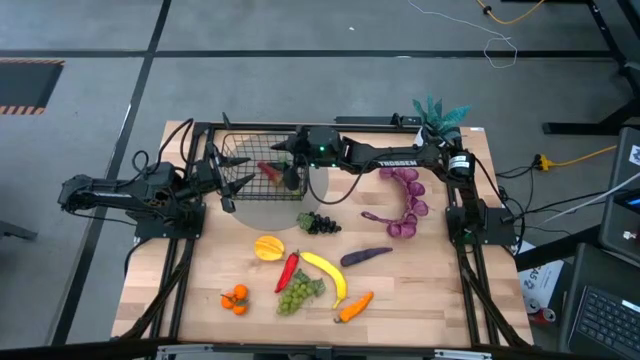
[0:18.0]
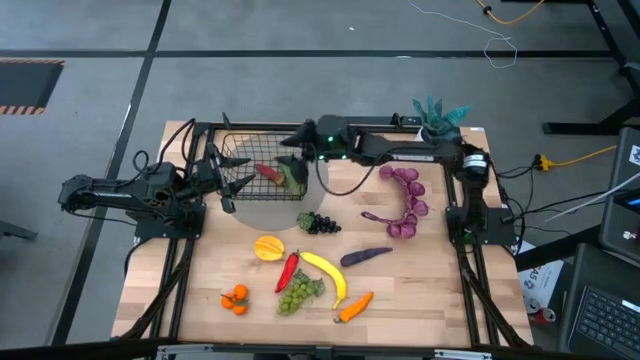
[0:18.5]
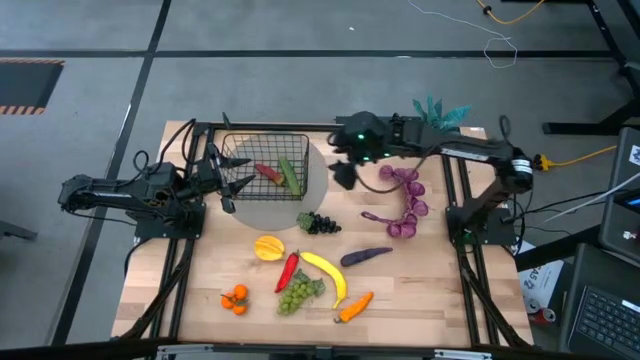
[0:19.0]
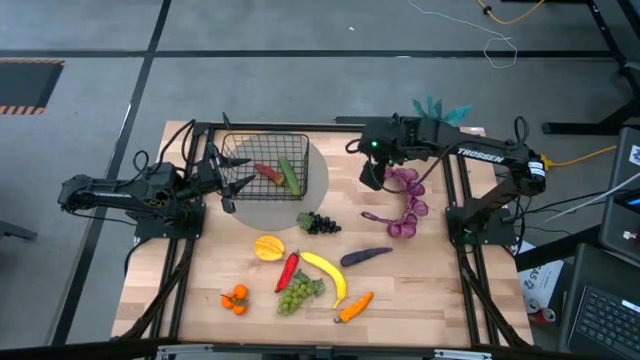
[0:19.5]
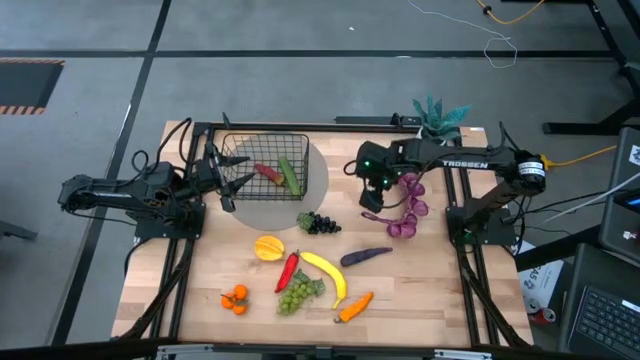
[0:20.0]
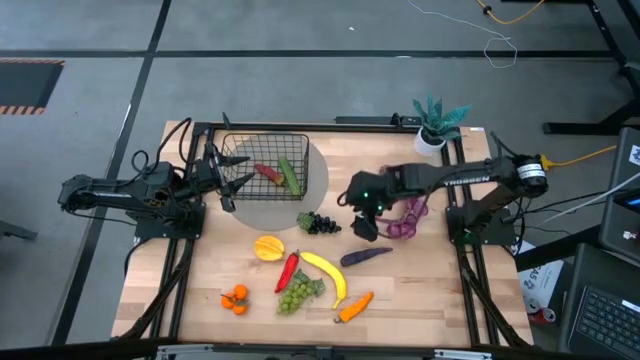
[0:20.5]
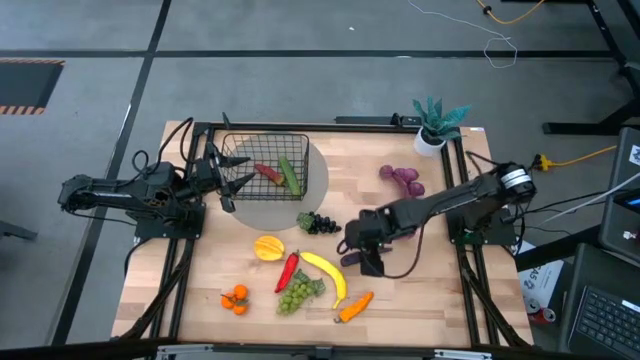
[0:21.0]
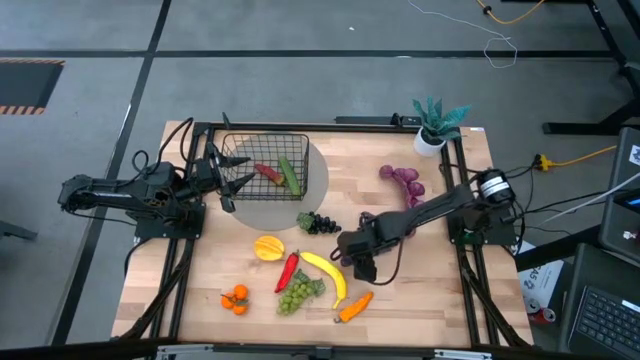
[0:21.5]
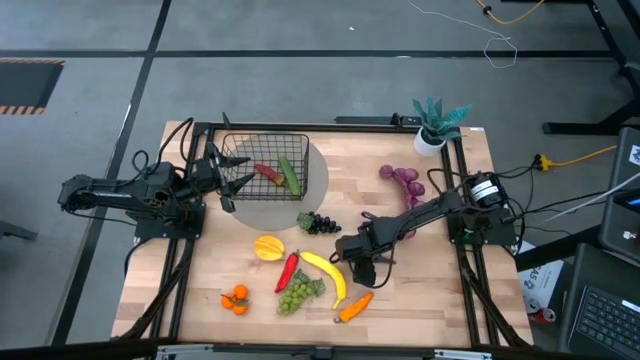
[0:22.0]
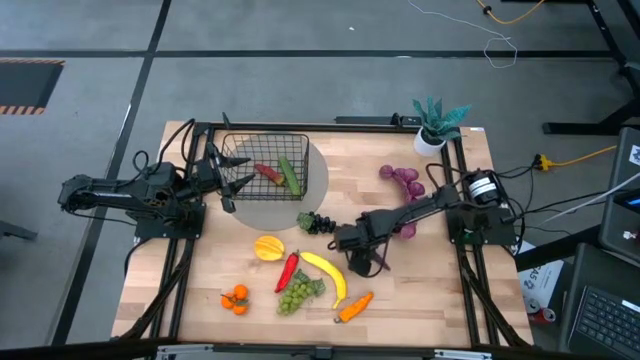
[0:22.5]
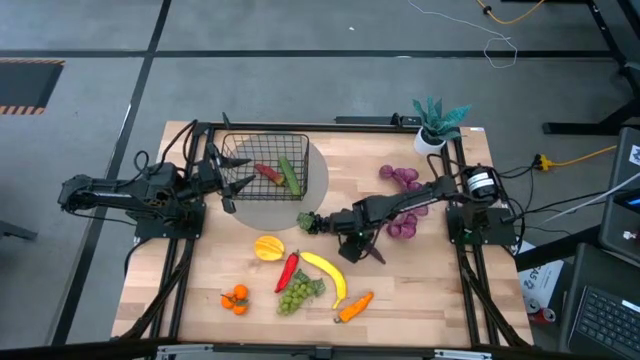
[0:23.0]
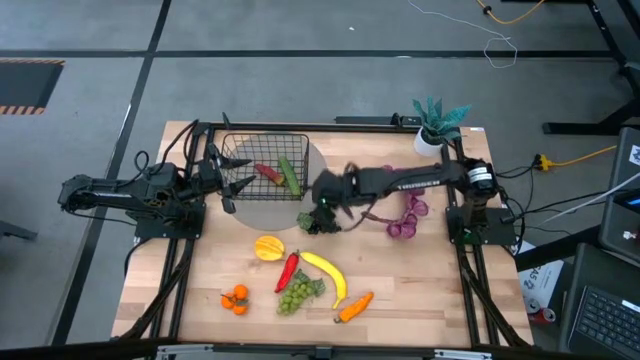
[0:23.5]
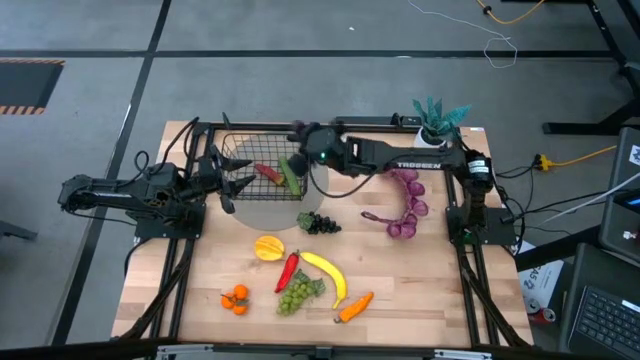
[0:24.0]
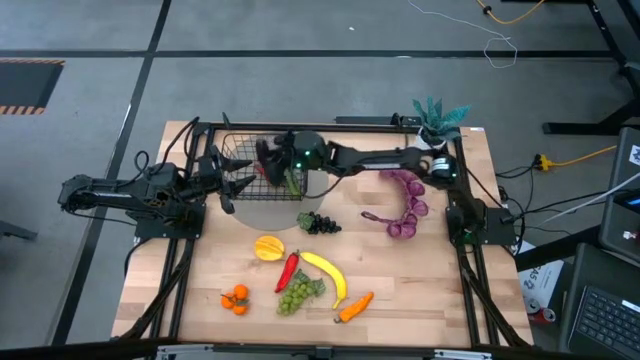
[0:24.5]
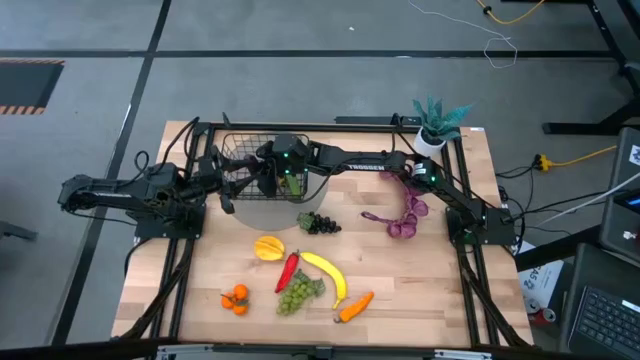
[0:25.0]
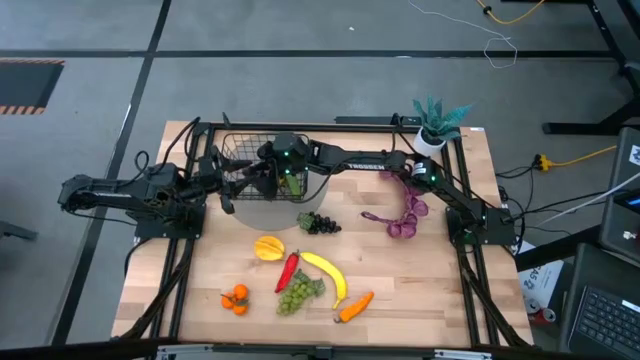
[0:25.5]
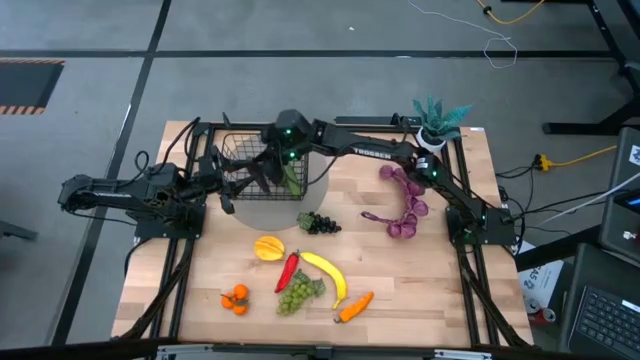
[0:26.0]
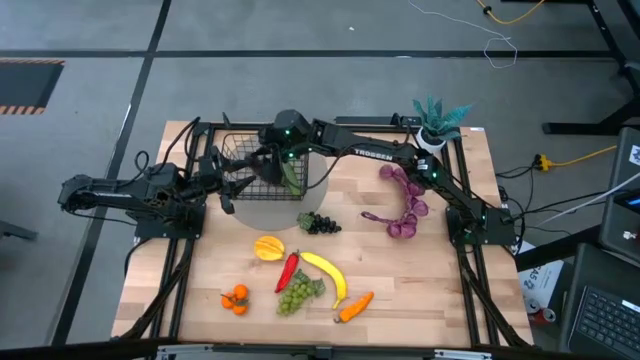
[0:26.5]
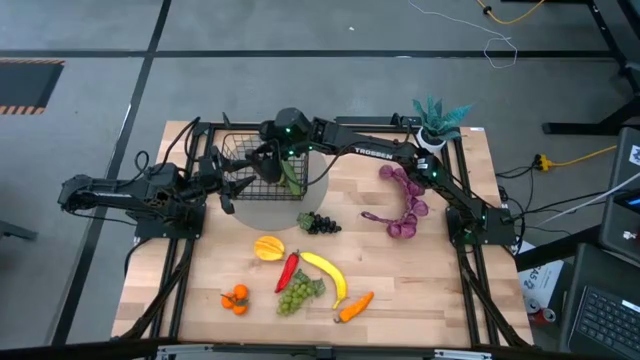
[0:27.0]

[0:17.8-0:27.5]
Task: Build produce basket
Put the violet eggplant into the wire basket

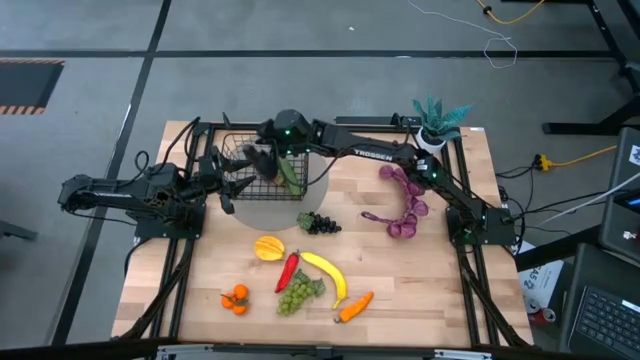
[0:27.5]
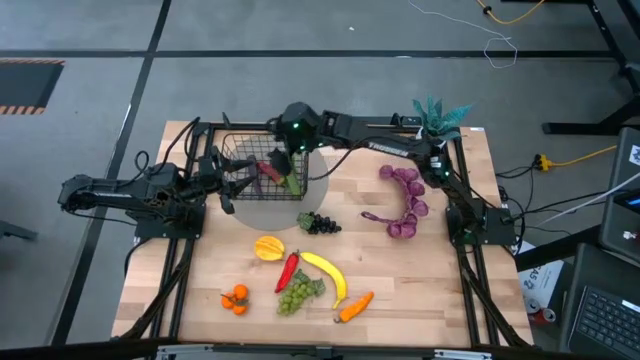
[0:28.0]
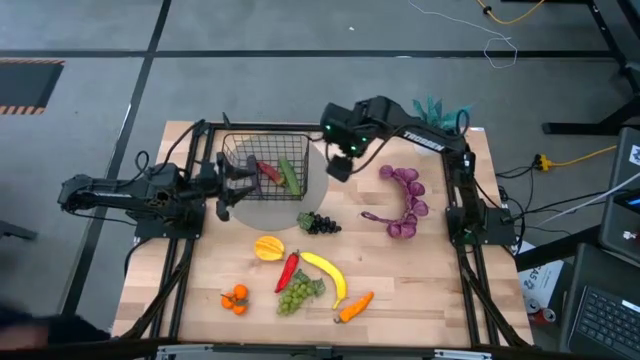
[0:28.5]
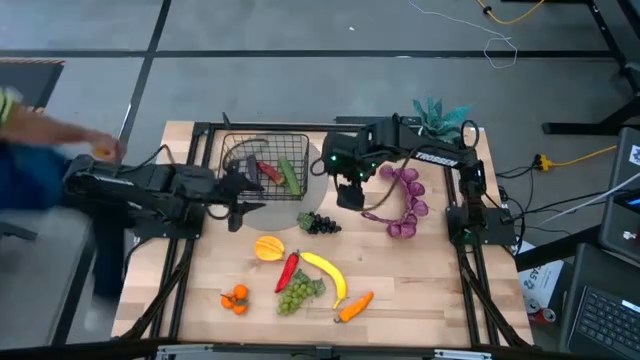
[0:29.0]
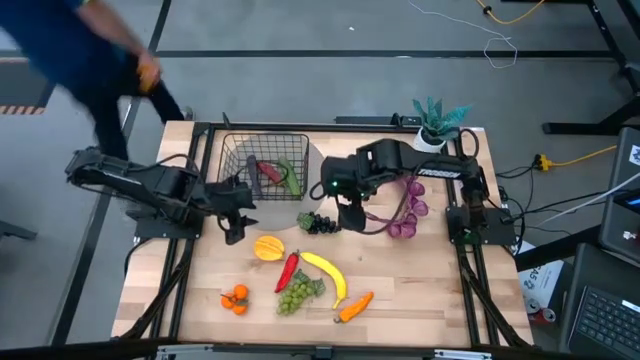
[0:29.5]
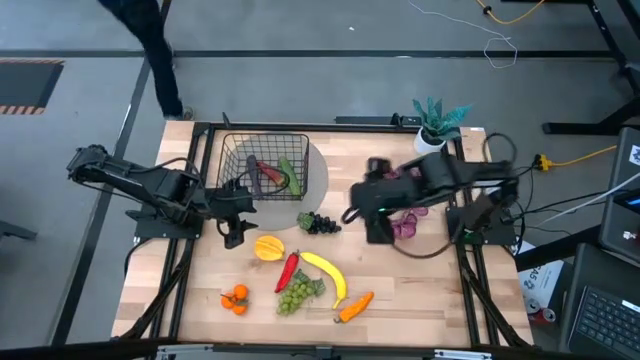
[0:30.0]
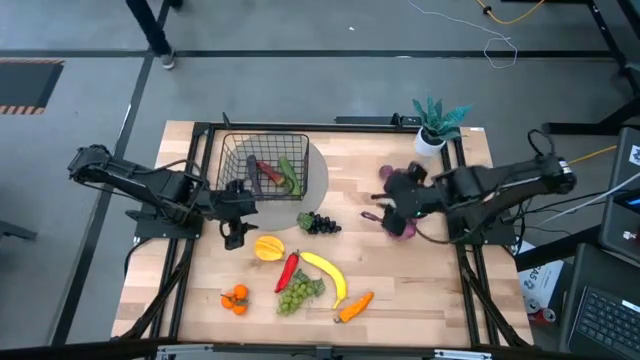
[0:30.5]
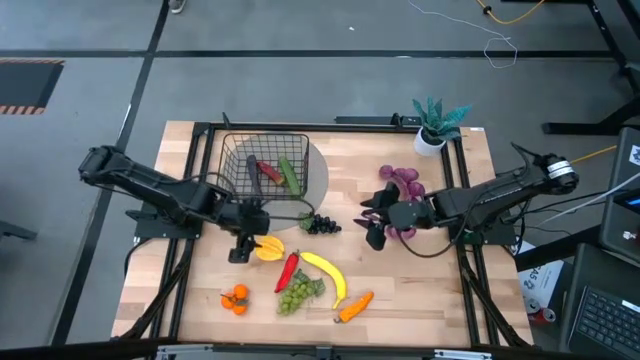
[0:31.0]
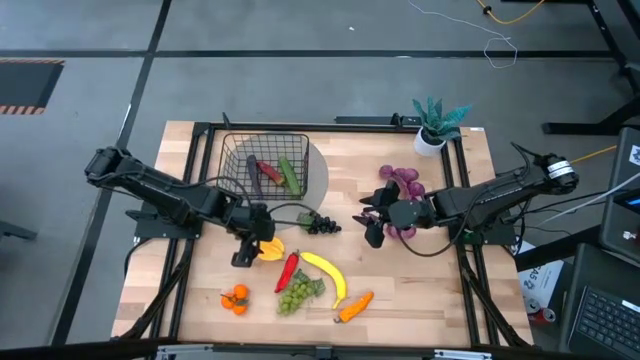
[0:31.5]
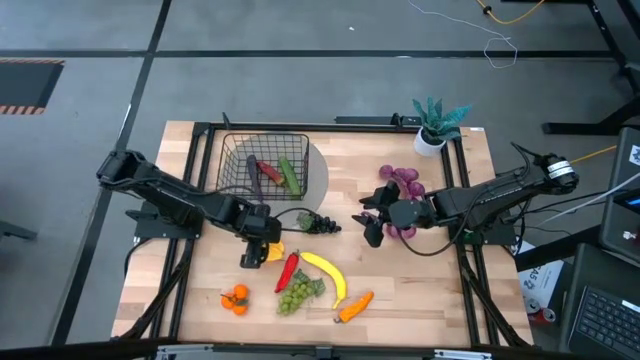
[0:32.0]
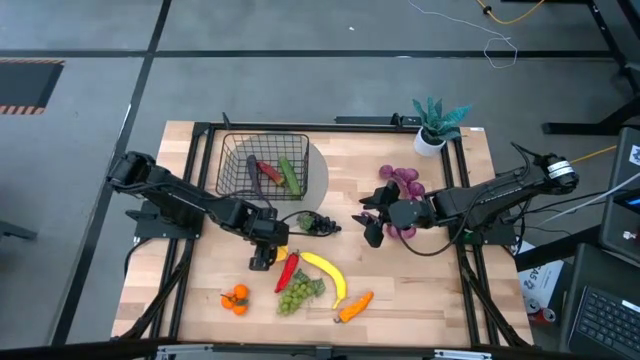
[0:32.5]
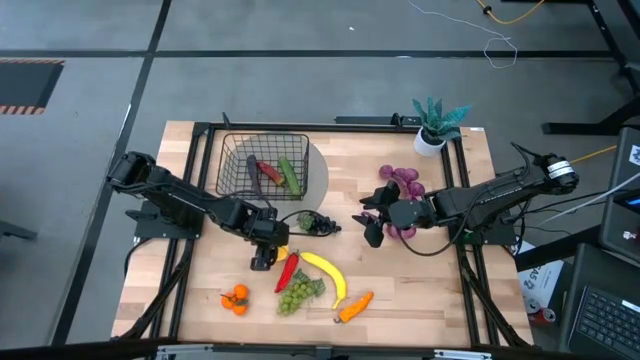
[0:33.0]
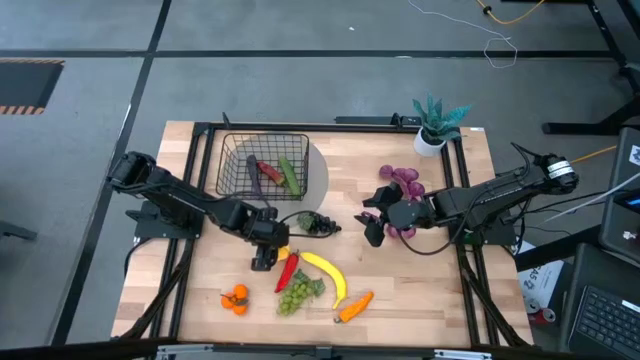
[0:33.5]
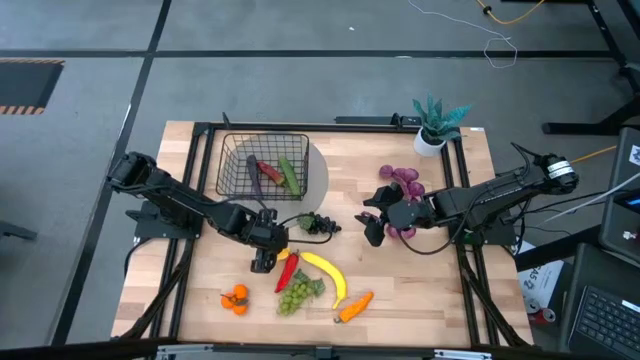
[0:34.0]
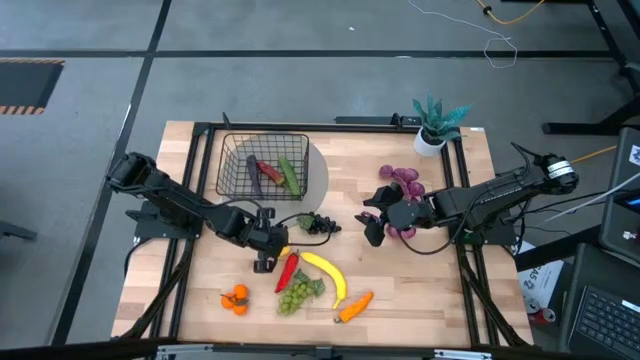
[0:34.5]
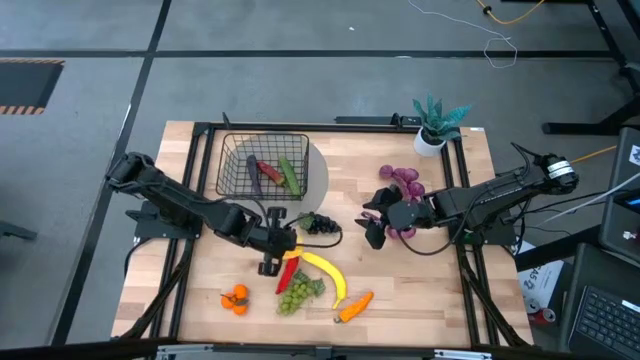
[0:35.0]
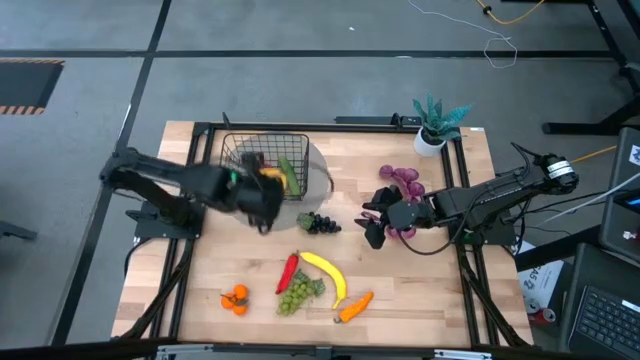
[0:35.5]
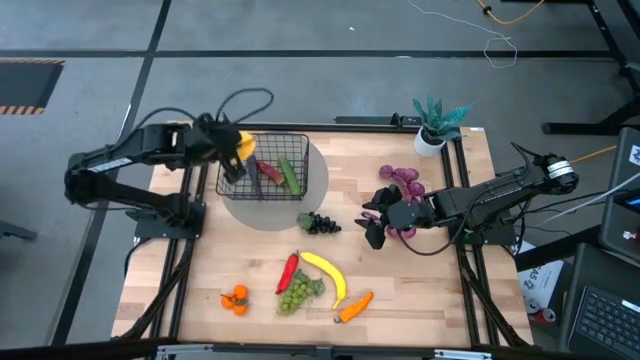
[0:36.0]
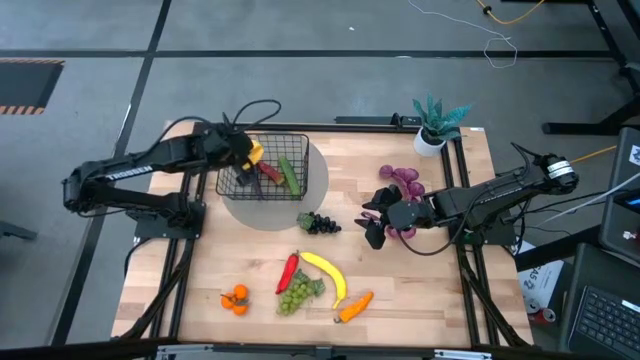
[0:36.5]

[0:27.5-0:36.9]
Put the yellow starfruit into the wire basket

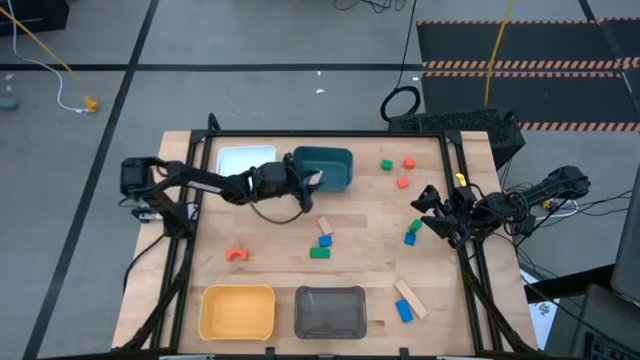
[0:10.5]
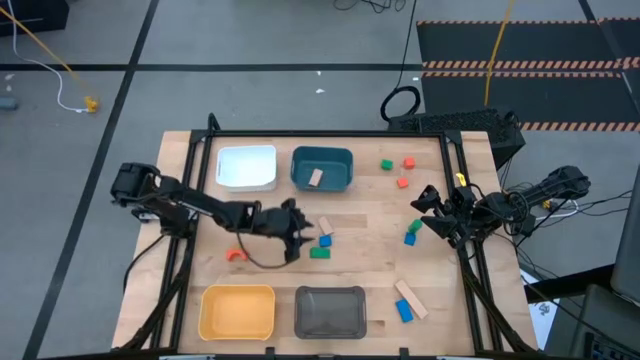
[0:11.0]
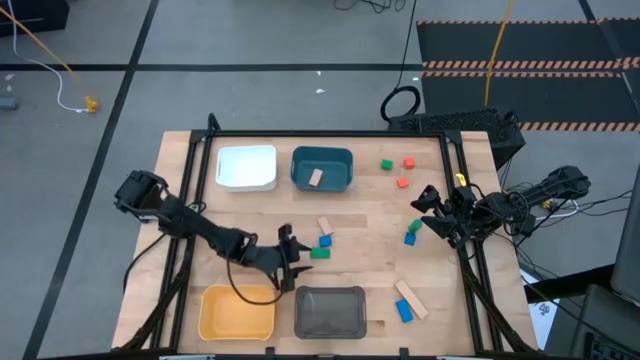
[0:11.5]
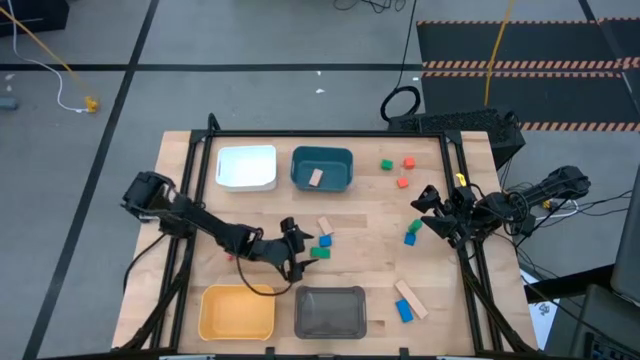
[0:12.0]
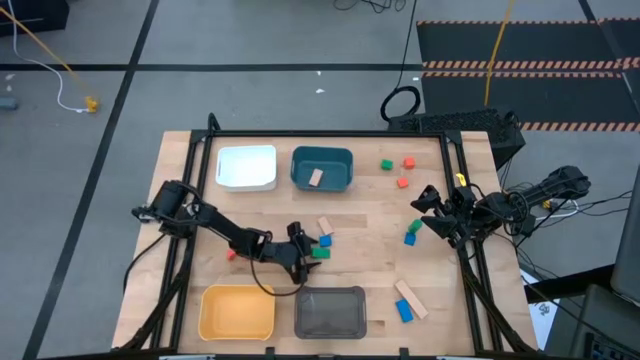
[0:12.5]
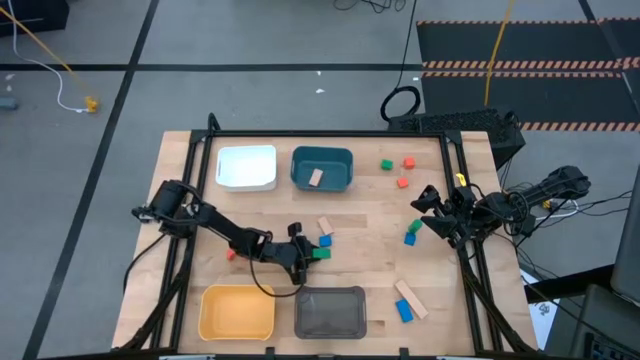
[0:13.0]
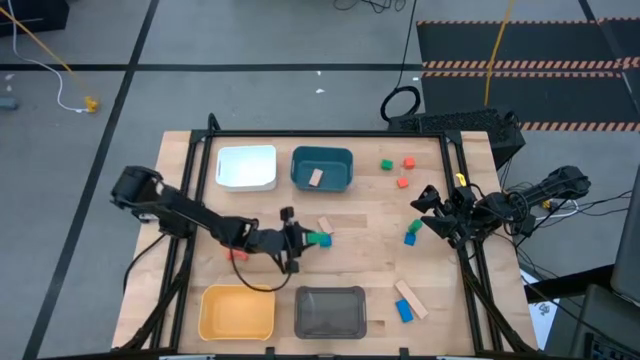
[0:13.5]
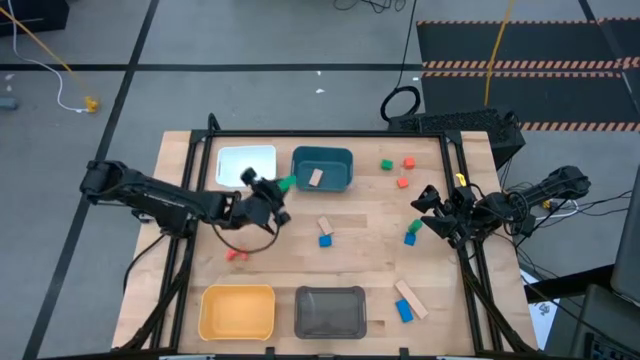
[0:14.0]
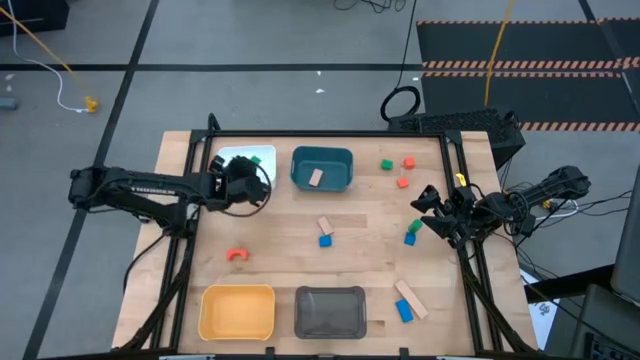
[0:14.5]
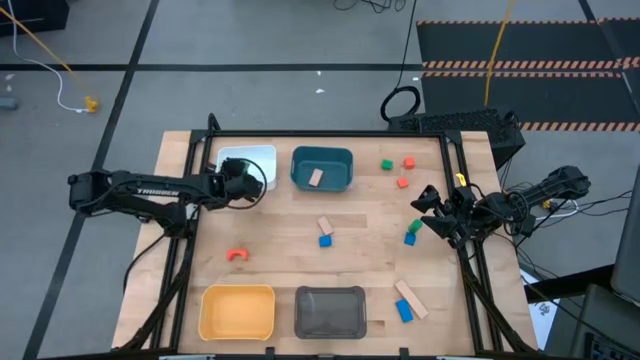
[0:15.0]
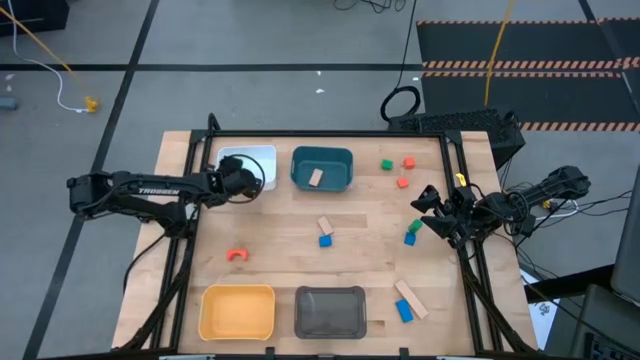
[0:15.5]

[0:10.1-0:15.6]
Task: Sort & place blocks by color
Put the bottom left green block into the white bin
